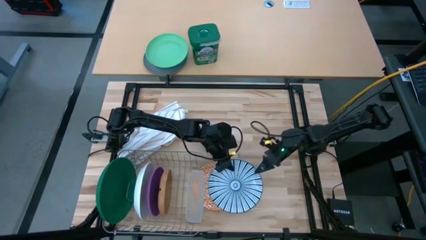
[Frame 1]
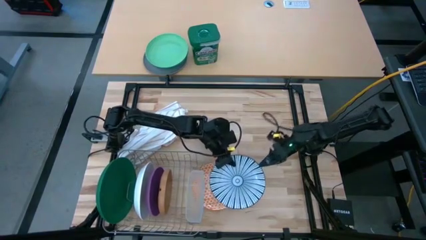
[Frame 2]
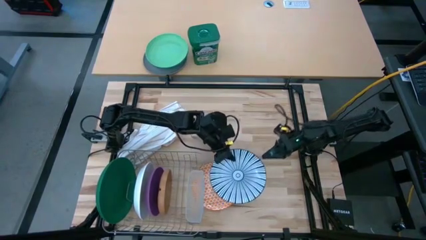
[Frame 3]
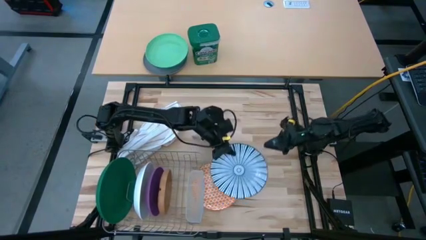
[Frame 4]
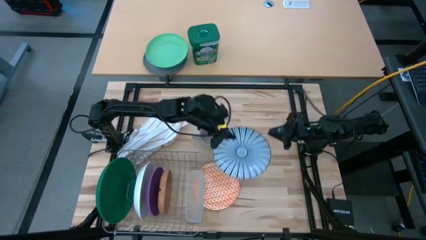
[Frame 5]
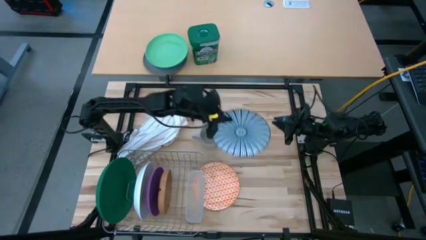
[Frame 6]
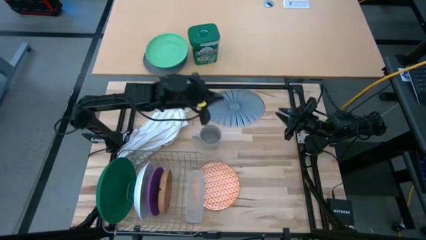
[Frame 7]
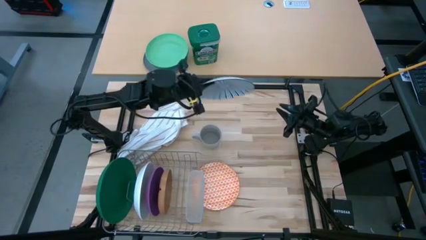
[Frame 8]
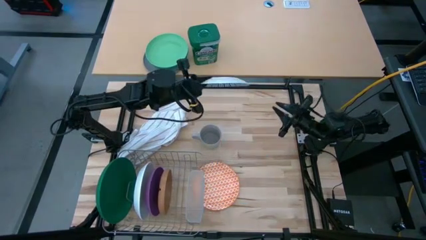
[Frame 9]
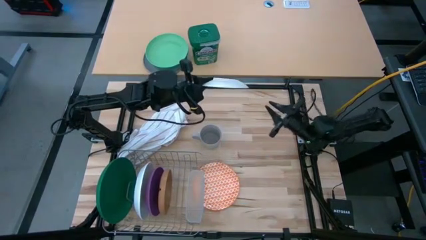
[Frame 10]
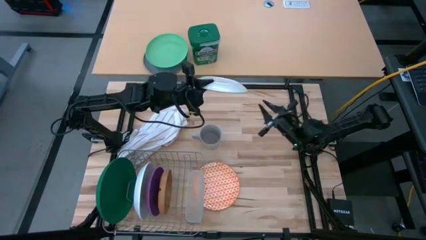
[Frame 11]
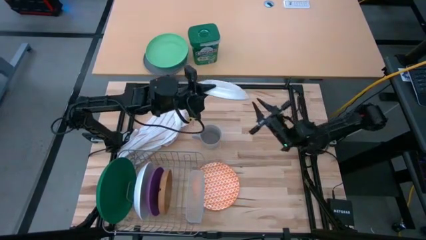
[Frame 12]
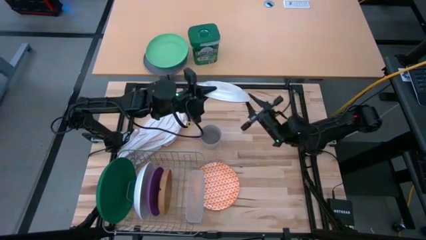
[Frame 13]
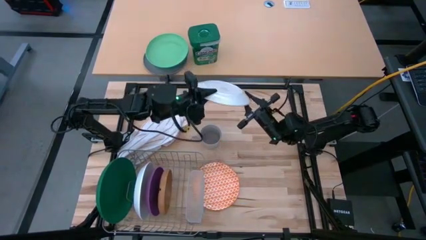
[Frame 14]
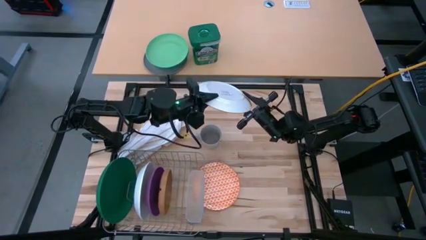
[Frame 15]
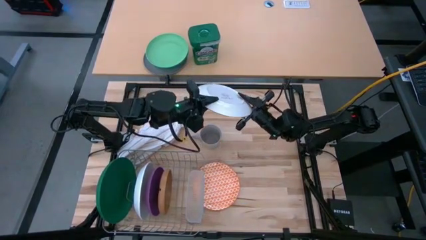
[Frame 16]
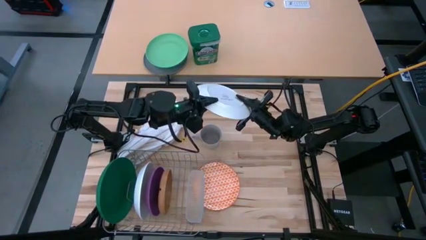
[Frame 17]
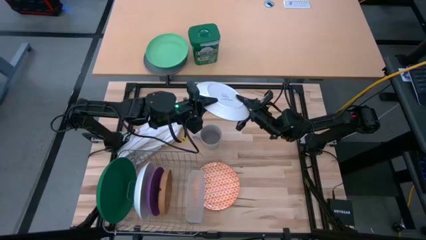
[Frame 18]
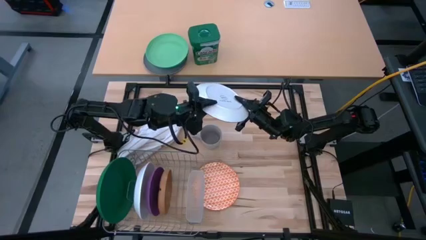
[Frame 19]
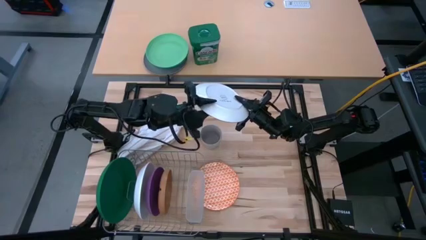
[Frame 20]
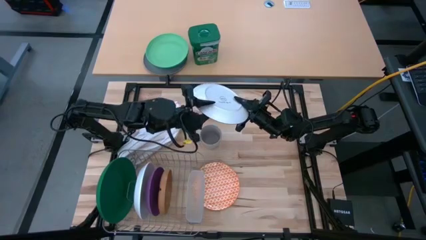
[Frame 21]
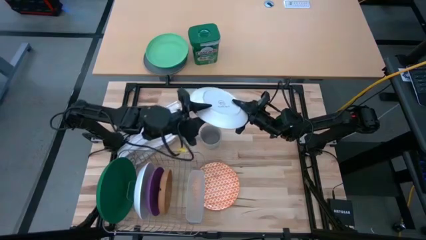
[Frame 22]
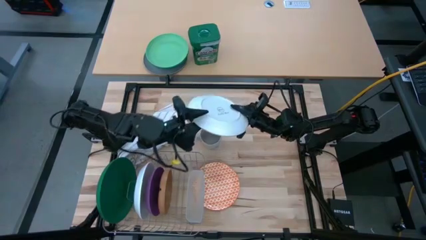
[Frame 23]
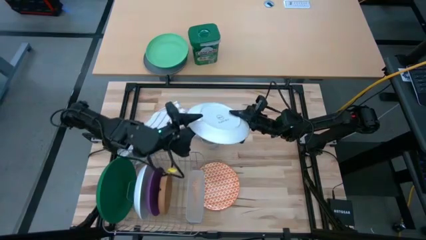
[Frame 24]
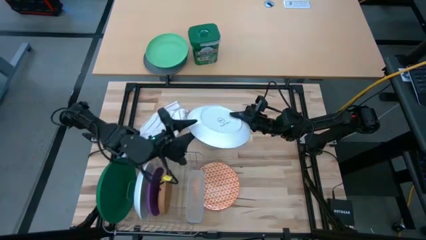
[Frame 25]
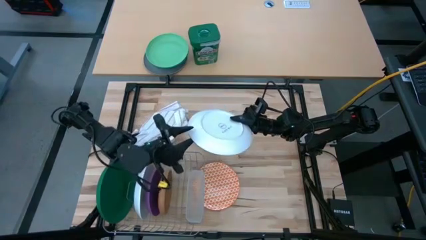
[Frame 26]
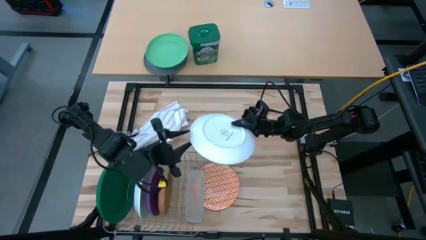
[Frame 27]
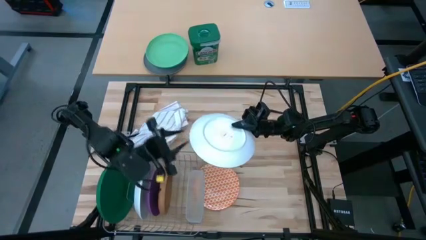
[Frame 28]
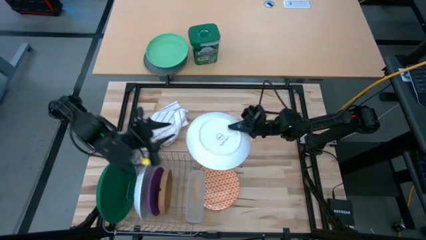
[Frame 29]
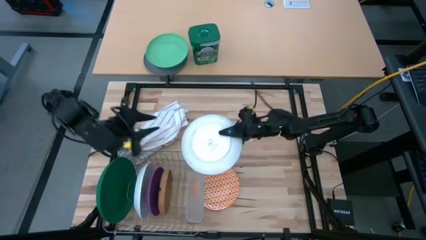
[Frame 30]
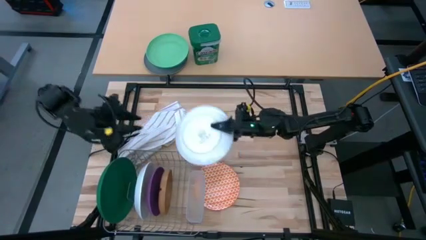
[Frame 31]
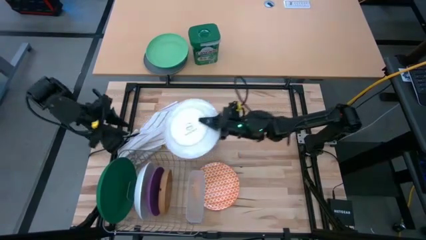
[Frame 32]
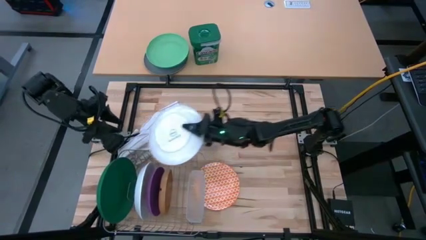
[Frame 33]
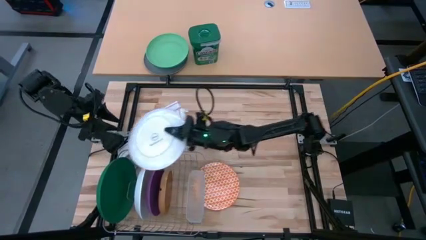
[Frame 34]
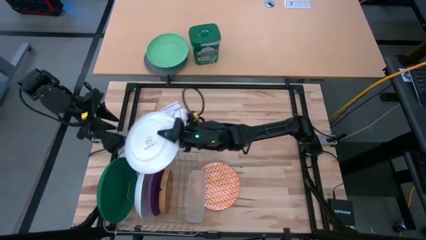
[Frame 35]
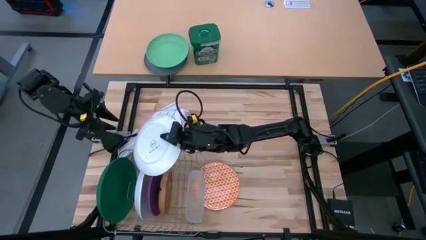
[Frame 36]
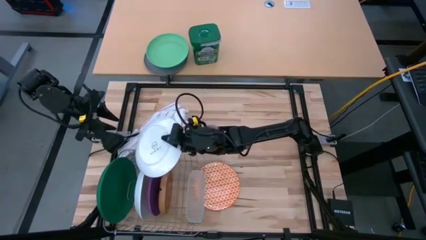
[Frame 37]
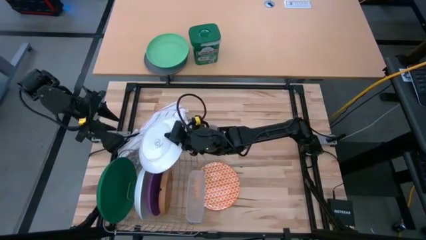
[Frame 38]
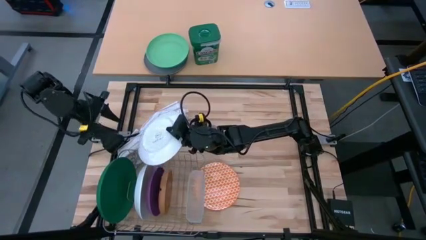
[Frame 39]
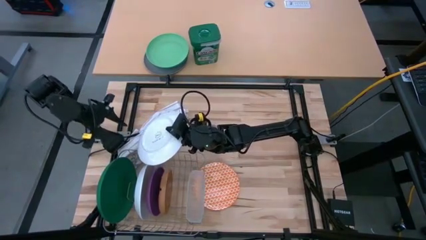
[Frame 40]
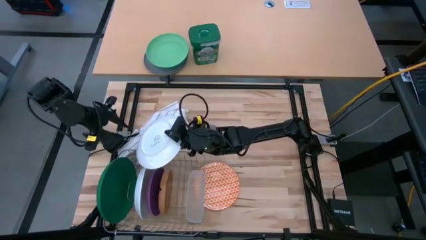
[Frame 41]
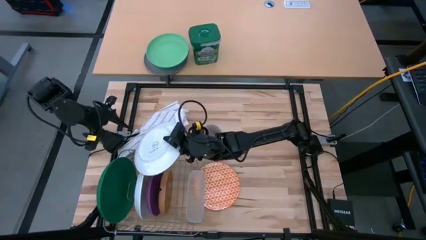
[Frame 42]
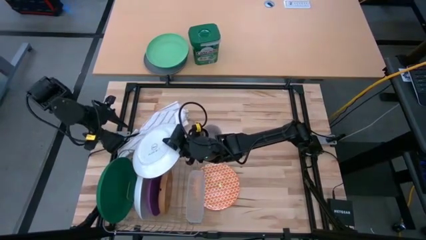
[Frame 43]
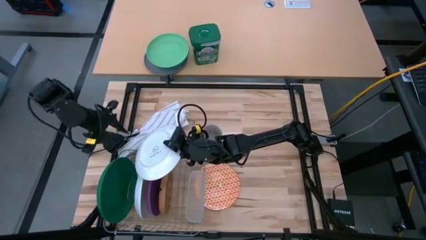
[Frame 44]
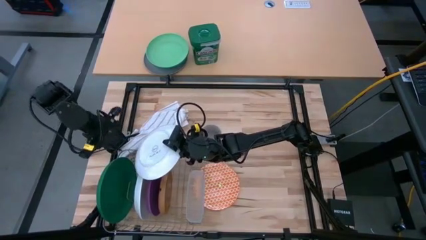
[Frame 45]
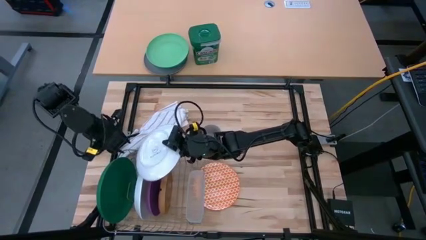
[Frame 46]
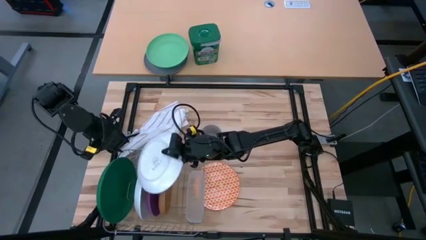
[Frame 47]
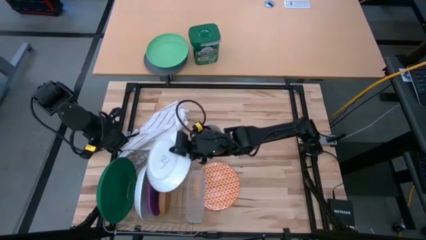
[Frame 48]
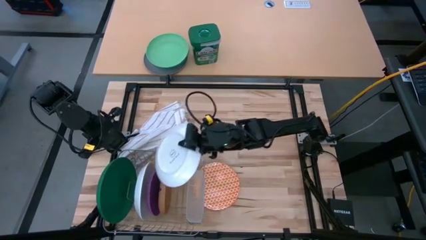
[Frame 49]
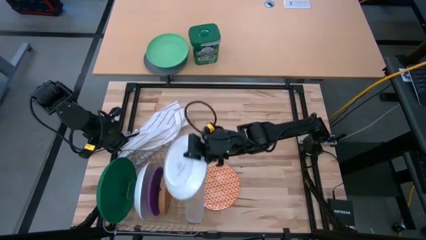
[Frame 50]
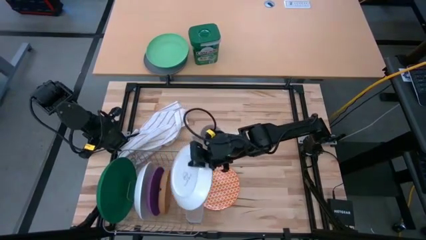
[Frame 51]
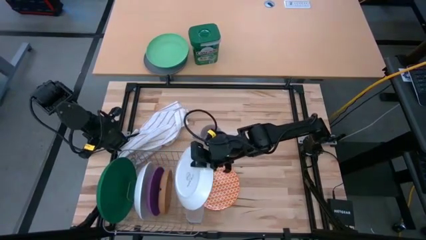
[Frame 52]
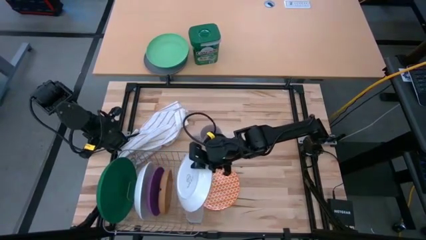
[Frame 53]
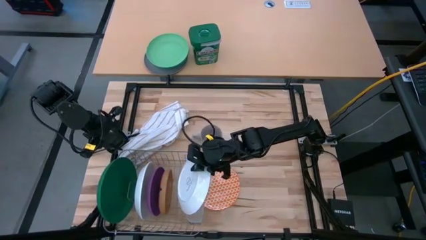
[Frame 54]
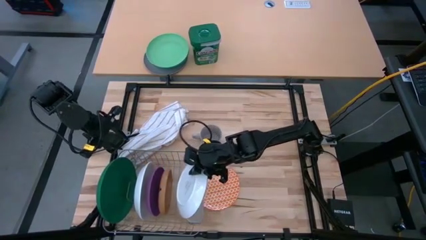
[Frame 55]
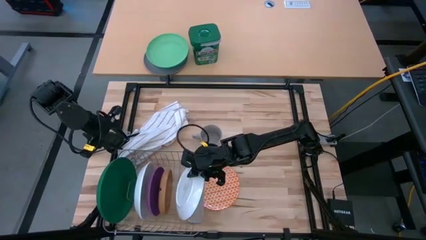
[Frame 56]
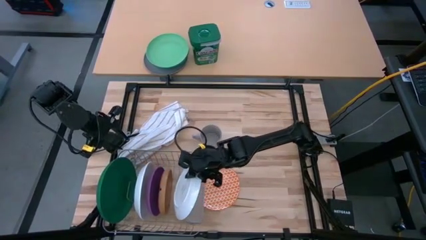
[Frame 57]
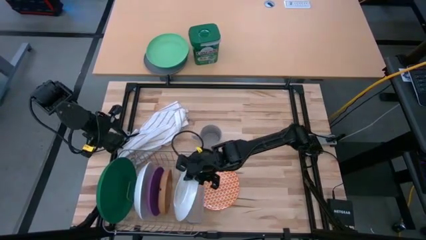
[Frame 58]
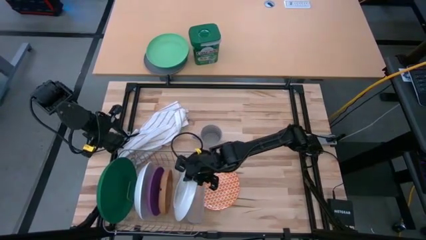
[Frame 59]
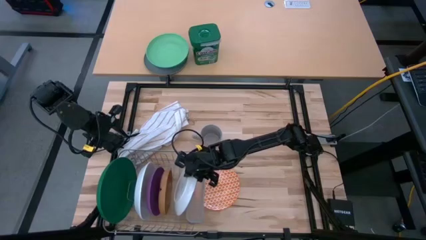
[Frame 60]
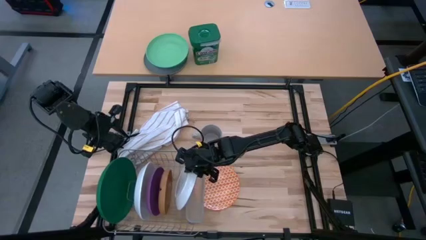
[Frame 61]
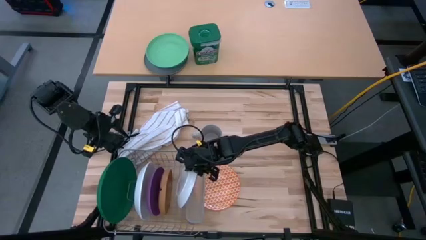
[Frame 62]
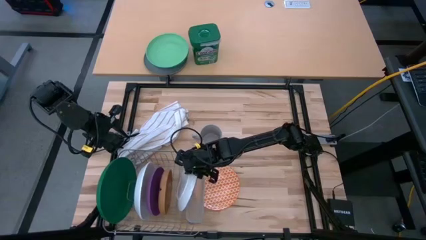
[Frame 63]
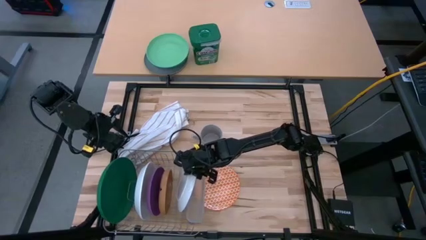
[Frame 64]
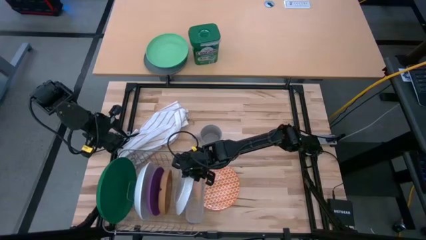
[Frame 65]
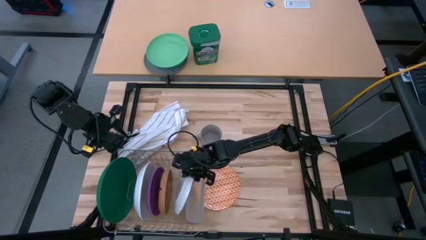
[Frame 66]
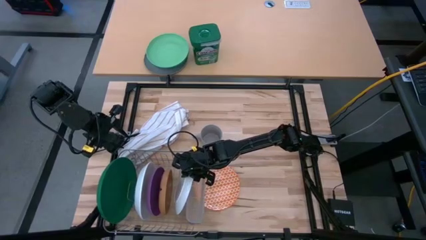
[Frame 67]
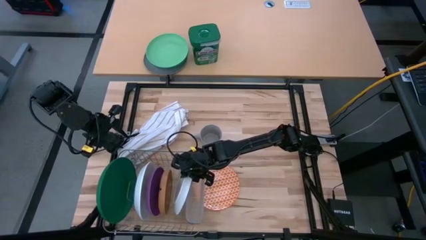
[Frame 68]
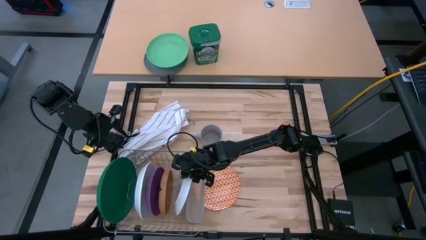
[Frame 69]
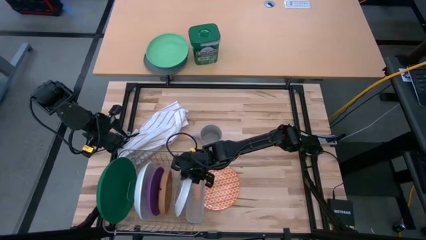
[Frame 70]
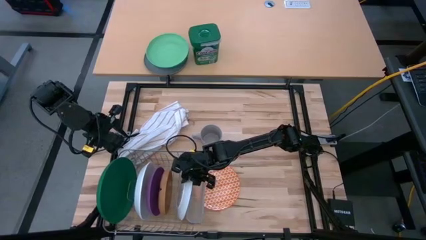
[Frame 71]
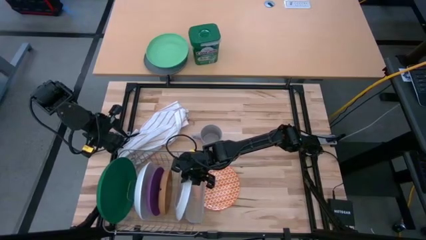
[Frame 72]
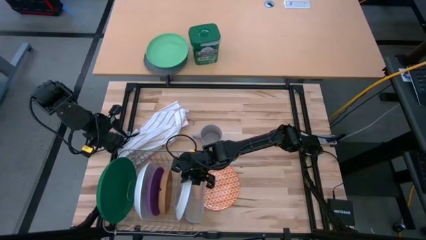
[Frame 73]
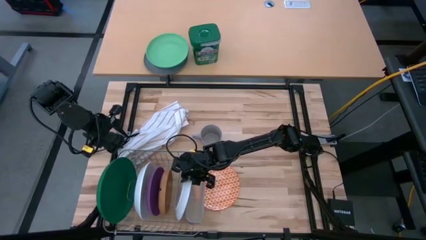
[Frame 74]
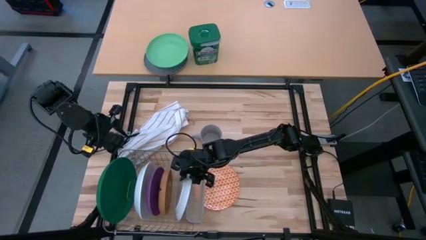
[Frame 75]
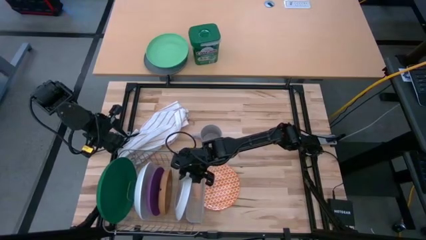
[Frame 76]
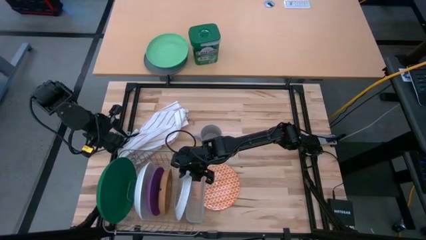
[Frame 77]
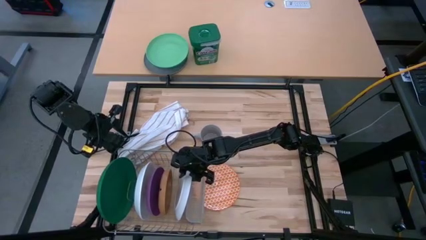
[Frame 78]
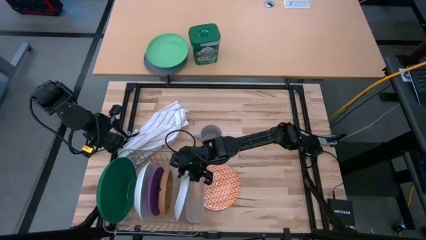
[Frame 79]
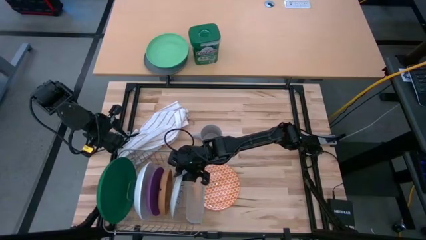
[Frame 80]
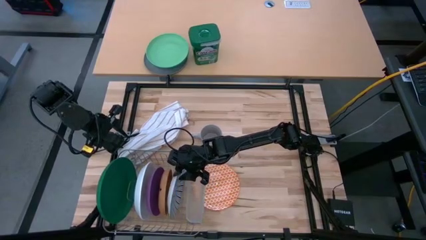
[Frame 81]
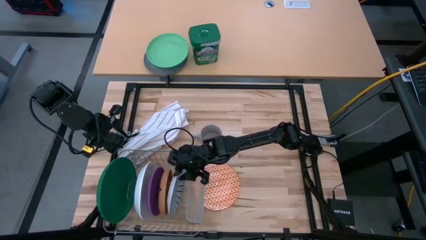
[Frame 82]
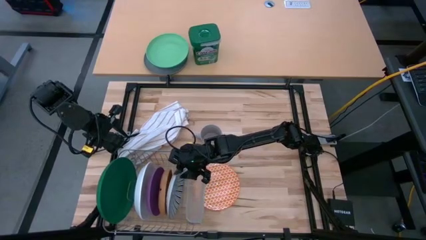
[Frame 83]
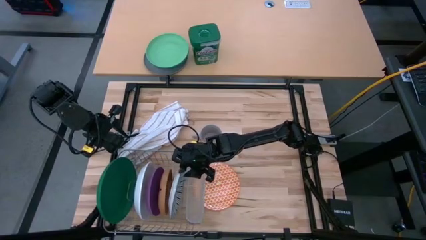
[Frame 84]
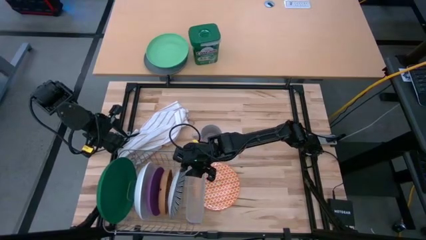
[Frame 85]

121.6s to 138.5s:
Task: Sort dishes
Put the blue patterned plate into the dish rack
